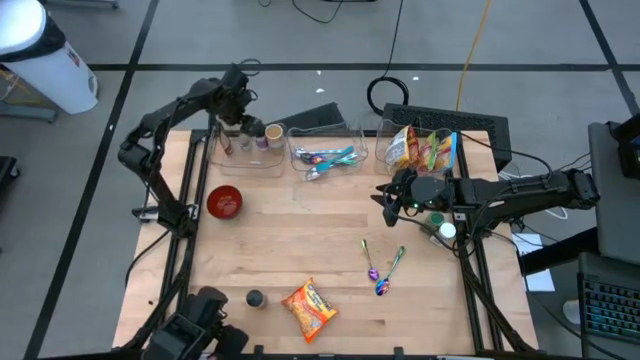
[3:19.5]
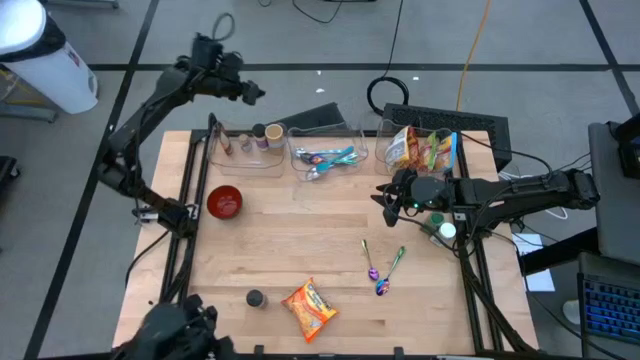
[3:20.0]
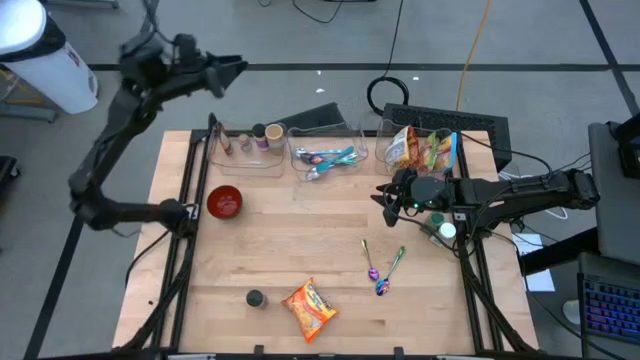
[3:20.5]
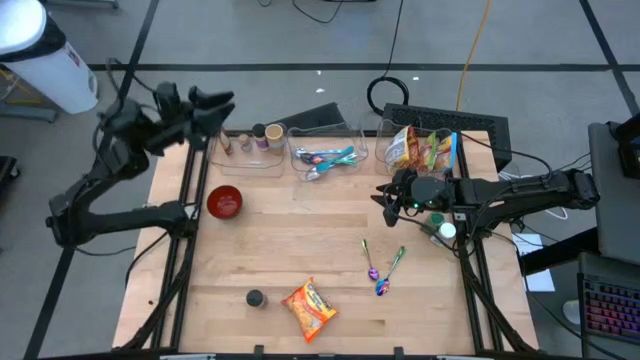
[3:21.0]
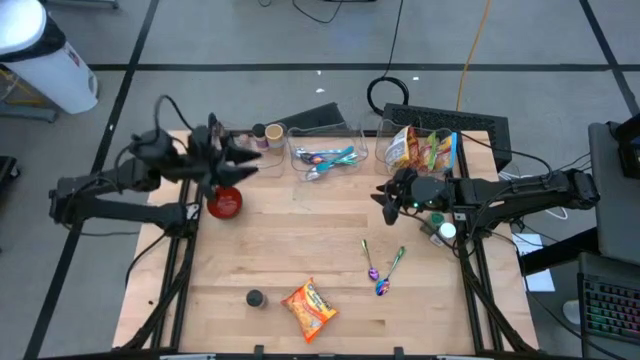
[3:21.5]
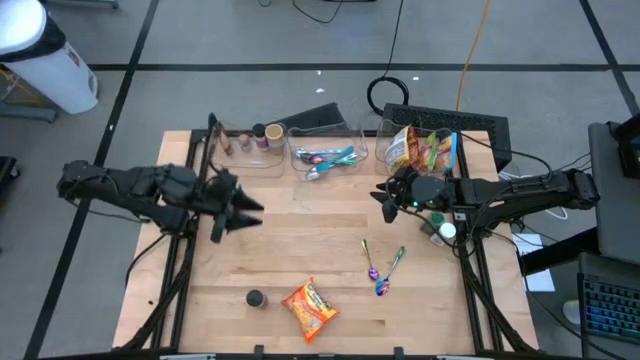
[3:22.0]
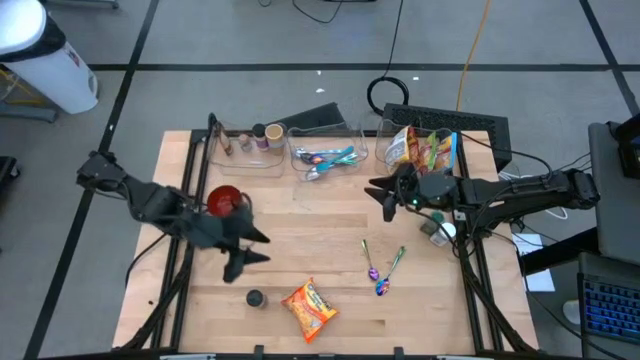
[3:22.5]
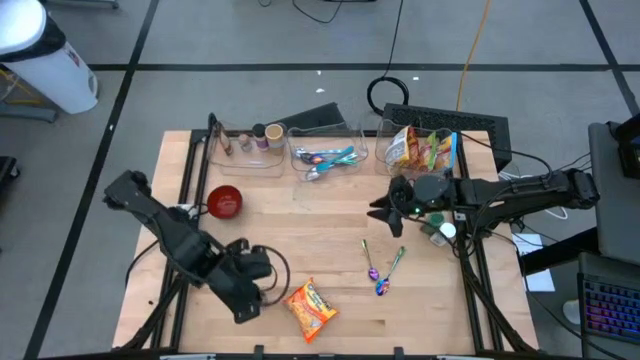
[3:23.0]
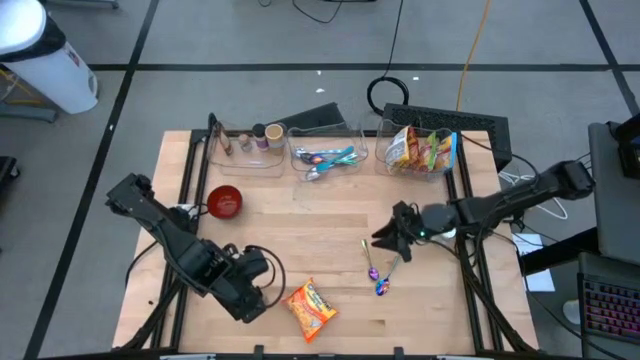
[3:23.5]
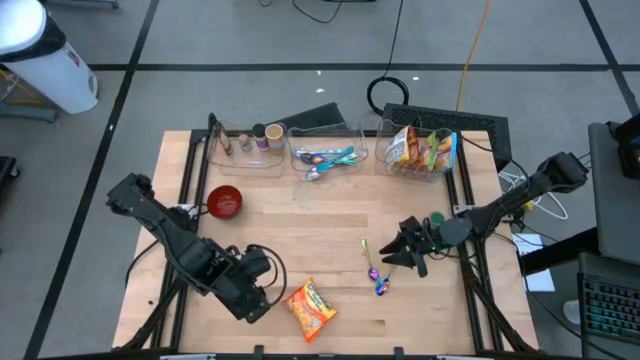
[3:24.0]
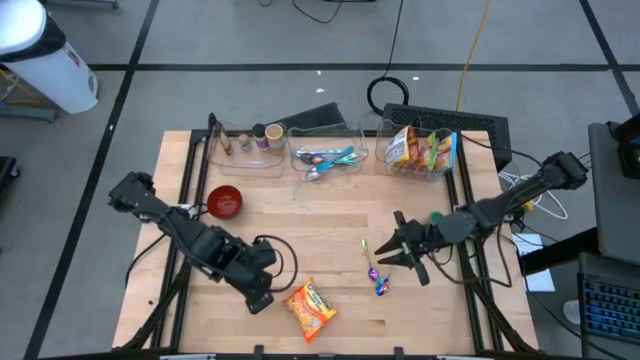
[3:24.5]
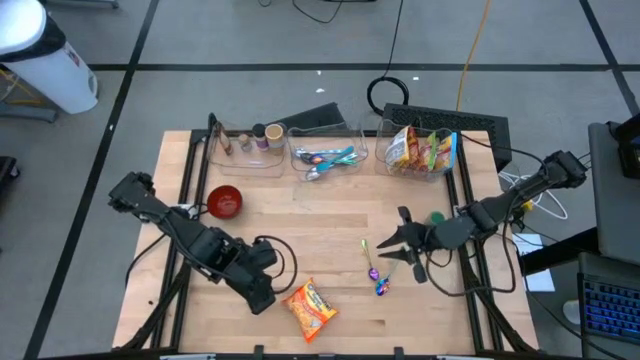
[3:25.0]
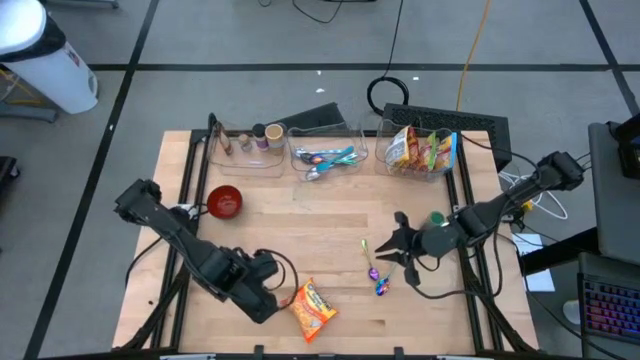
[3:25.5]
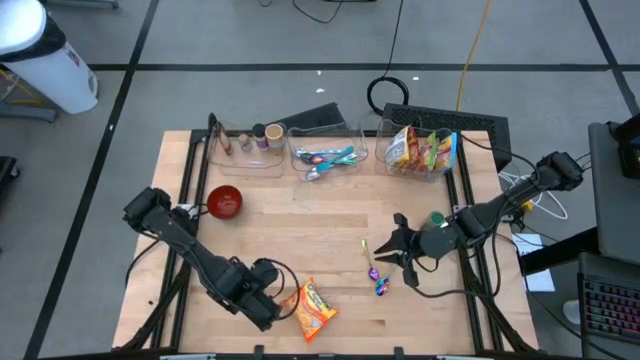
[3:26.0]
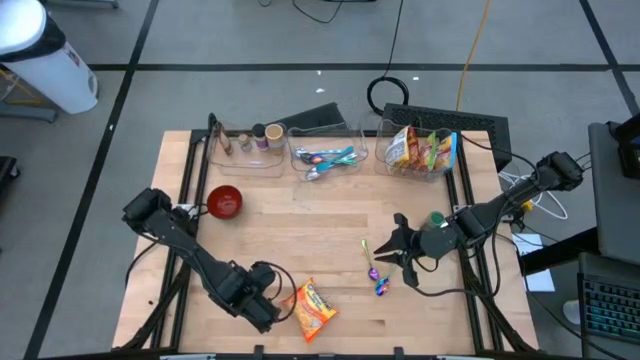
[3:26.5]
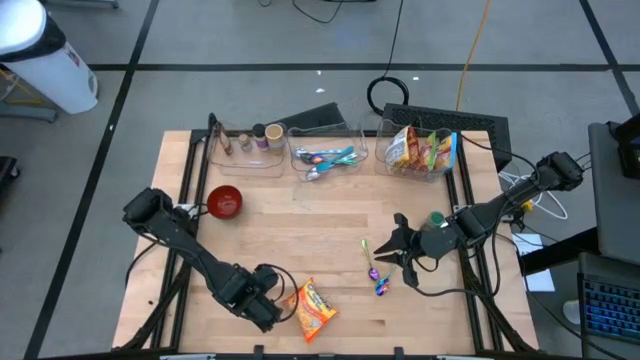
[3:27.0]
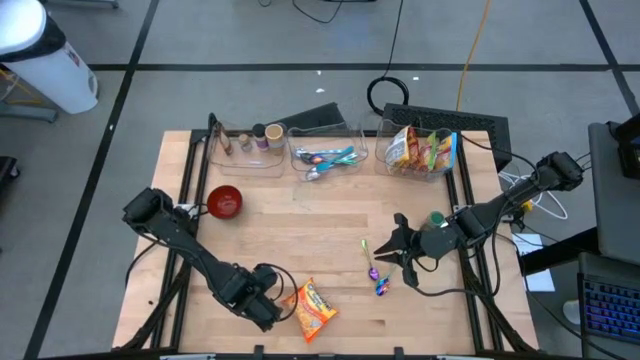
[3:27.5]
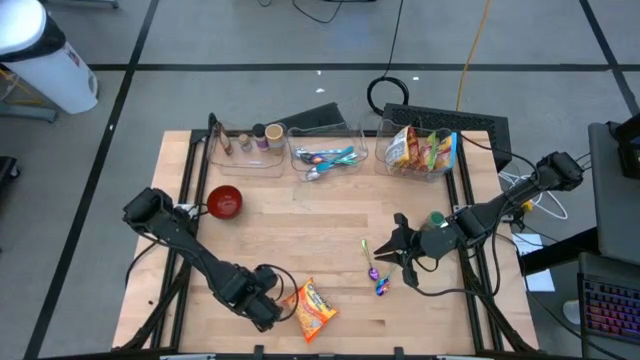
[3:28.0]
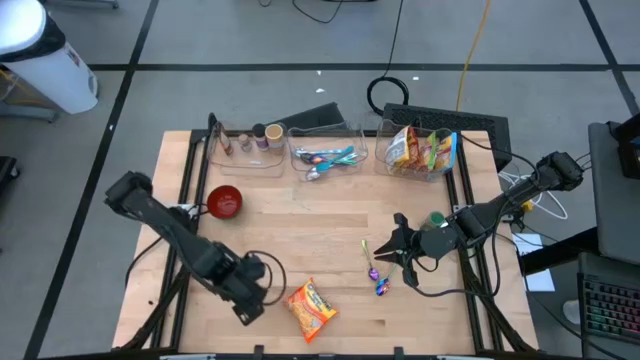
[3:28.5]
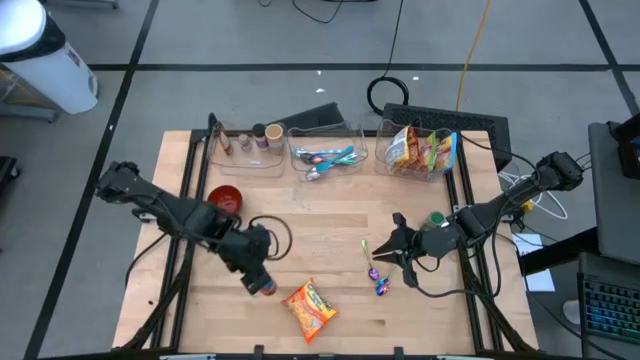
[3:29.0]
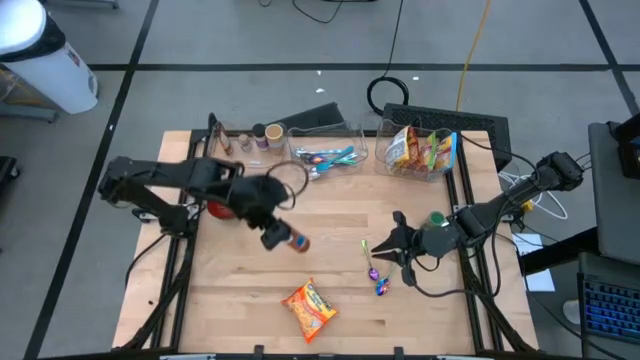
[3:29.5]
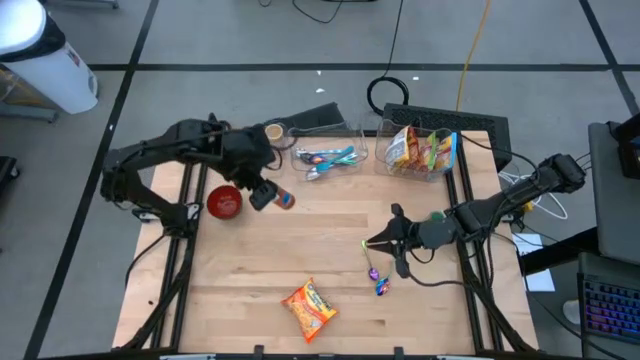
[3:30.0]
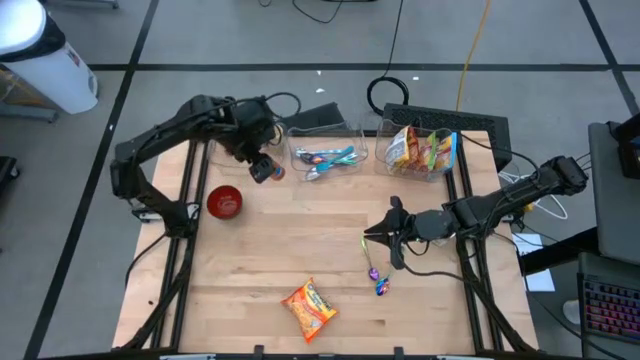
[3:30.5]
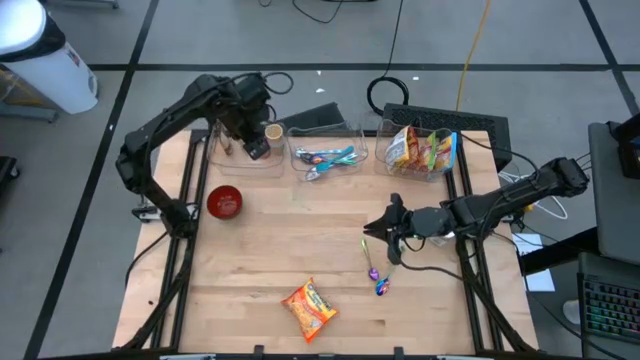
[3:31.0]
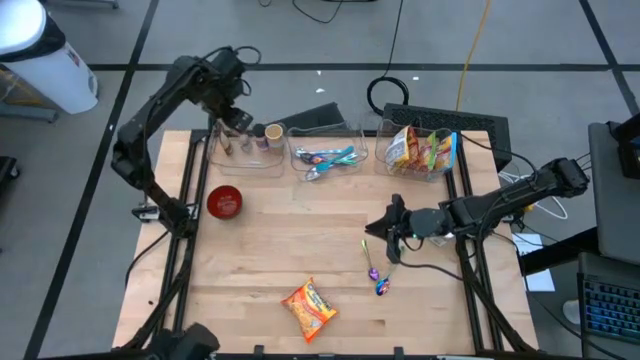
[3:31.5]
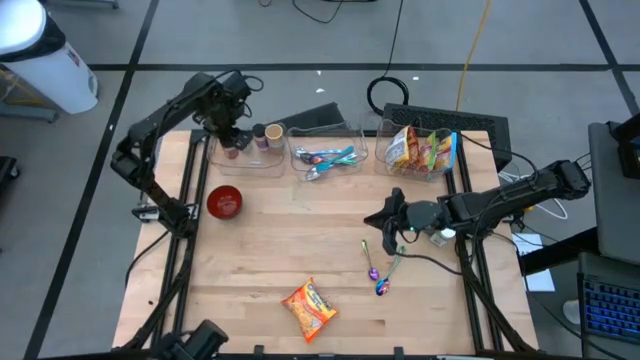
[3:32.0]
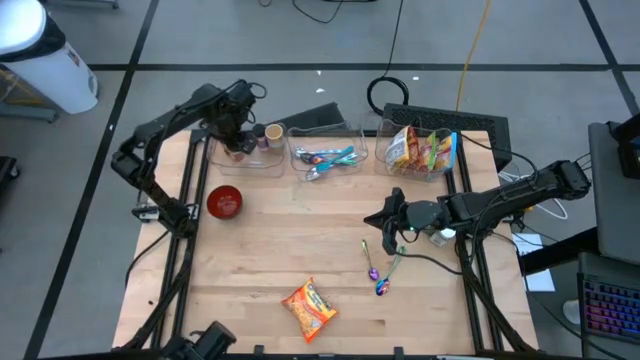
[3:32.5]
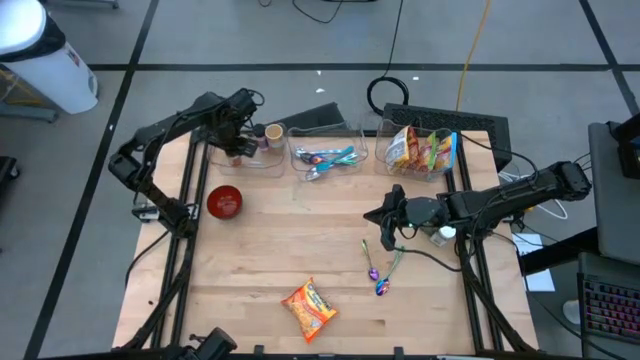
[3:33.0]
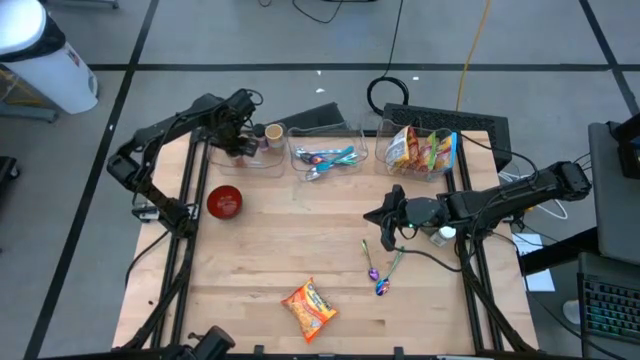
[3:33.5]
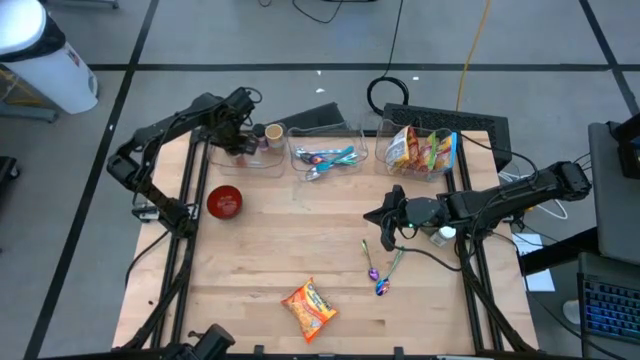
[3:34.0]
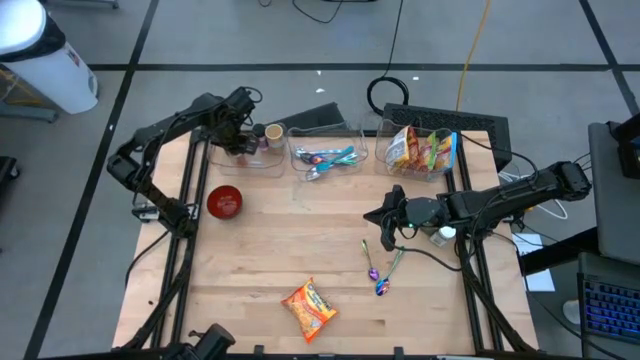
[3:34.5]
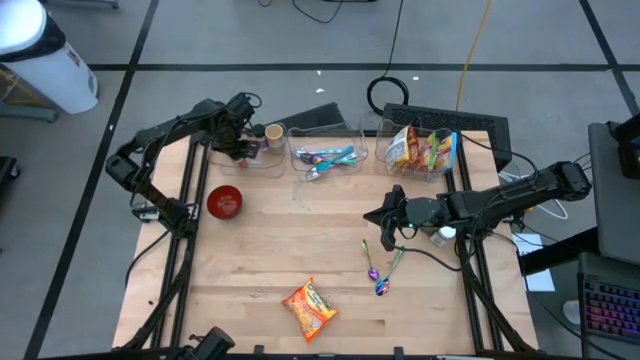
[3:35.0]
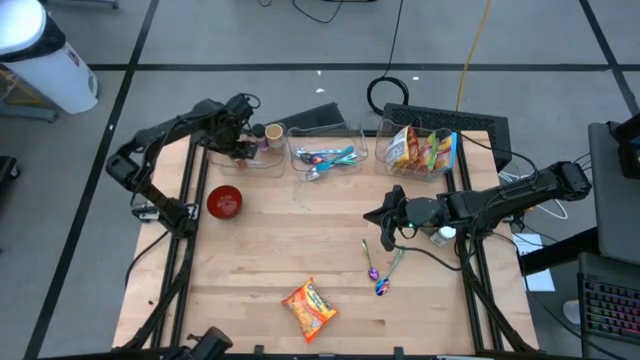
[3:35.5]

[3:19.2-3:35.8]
Task: Pick & Place Food Item
Put the orange seasoning bottle into the left transparent bin

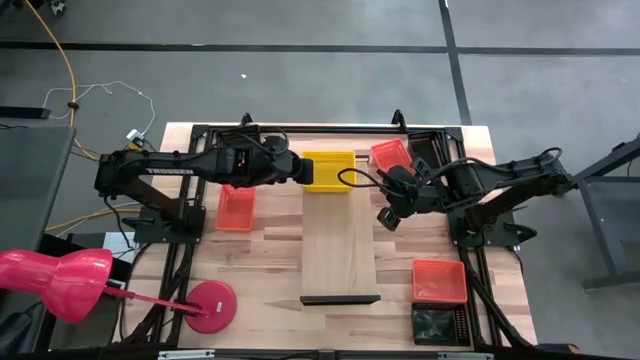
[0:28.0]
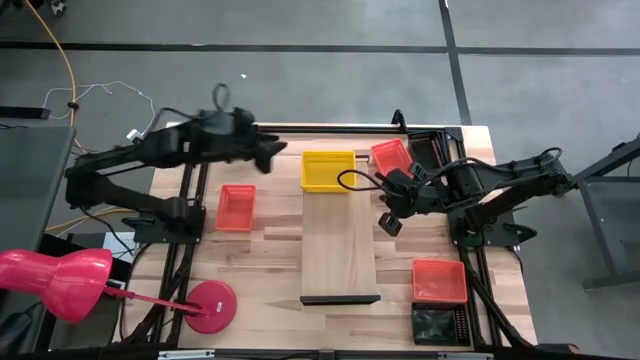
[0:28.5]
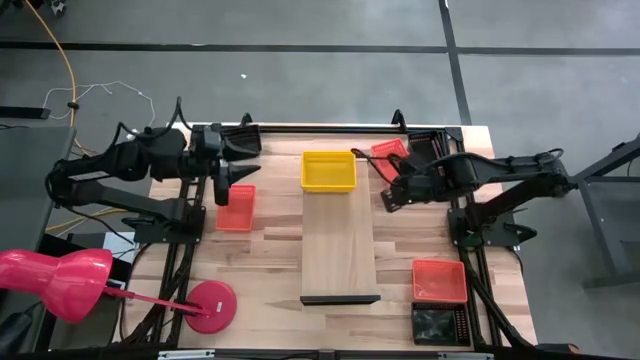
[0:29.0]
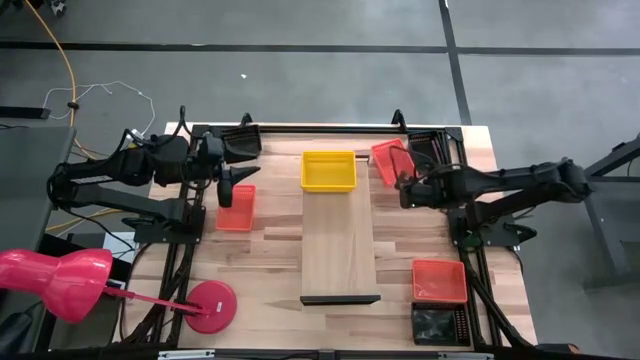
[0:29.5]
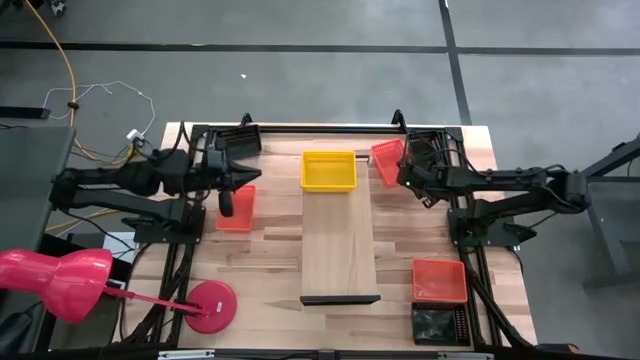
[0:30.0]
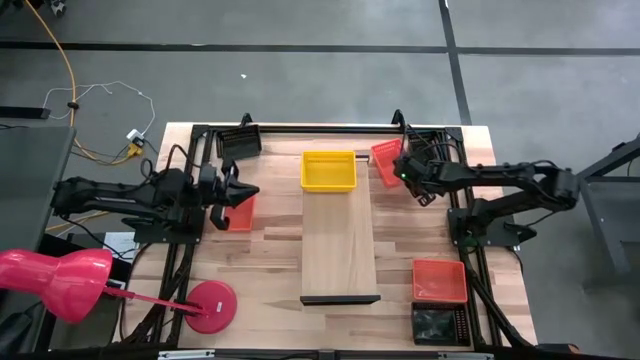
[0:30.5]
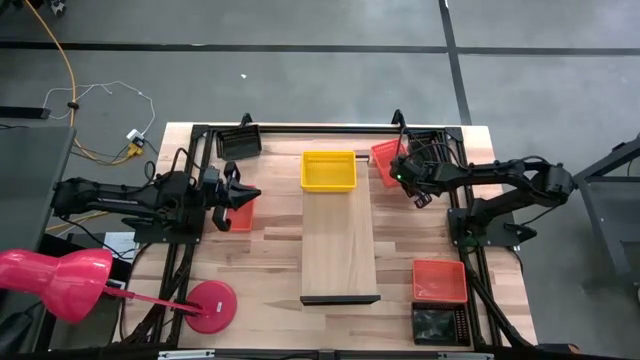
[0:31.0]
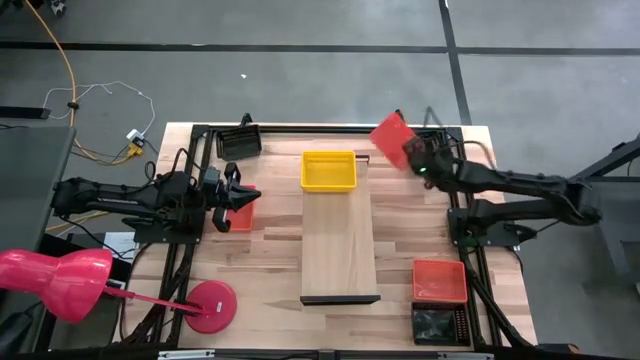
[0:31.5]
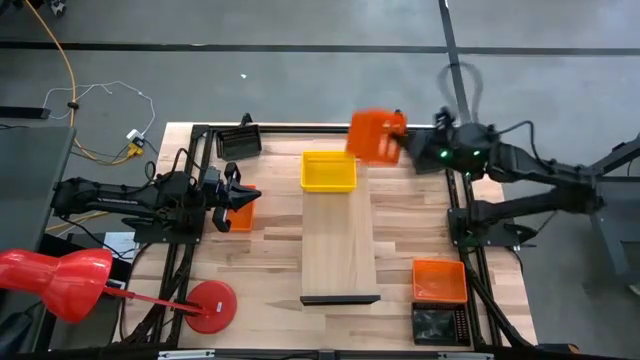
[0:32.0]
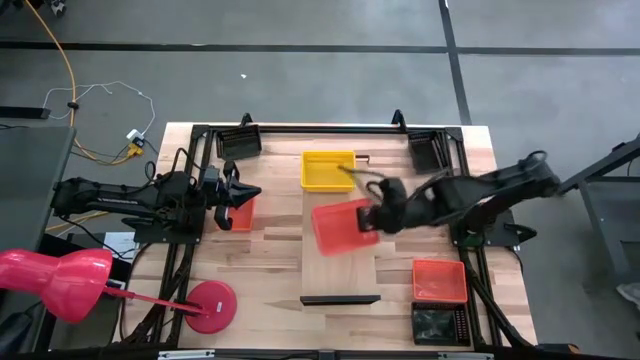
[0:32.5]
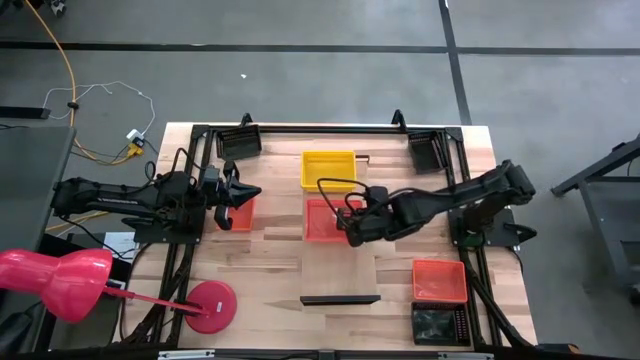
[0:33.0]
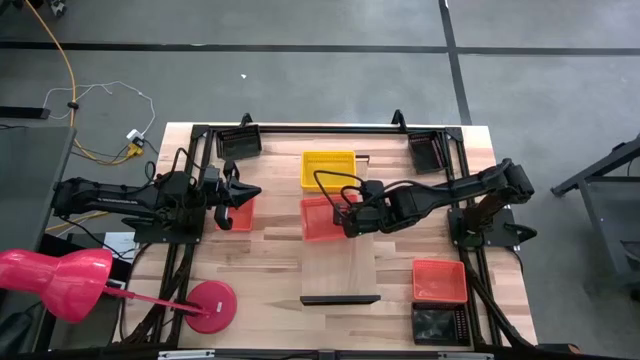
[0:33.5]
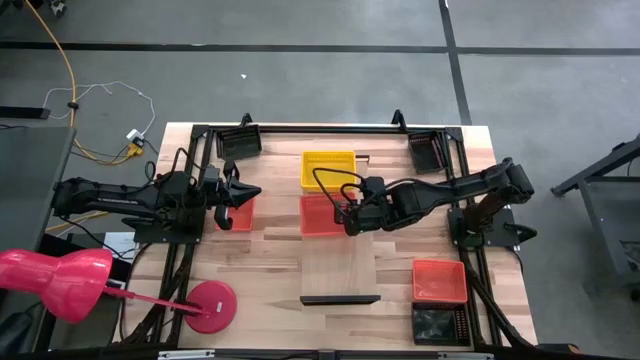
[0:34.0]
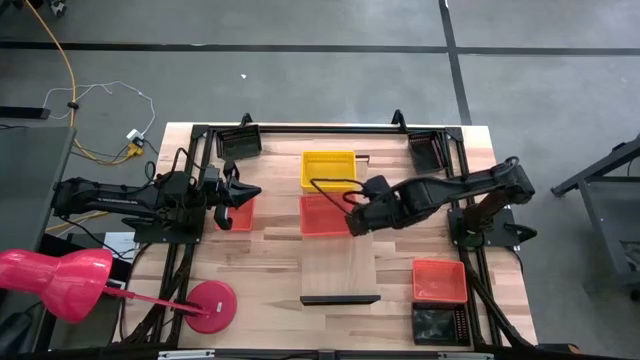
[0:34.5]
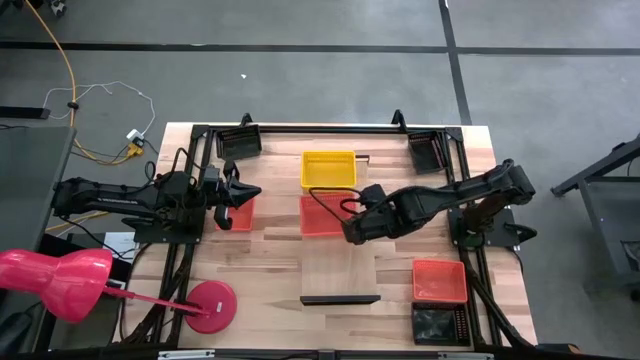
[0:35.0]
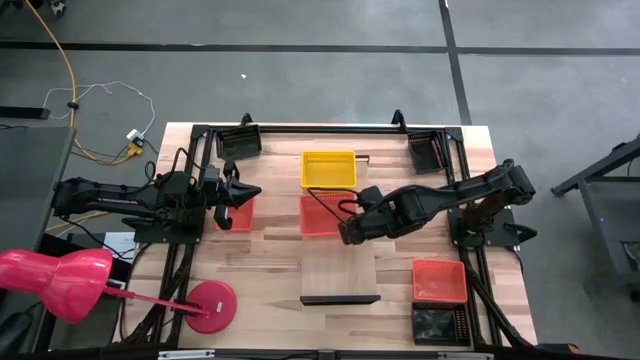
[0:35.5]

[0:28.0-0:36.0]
Task: Stack baskets on shelf by color
Put the top orange bin on the shelf
